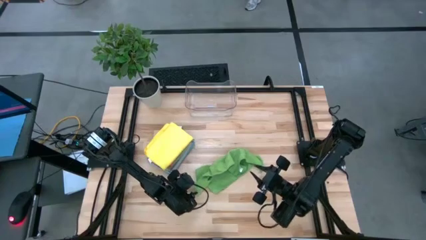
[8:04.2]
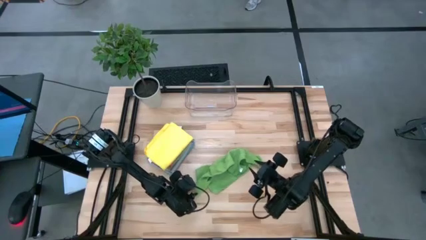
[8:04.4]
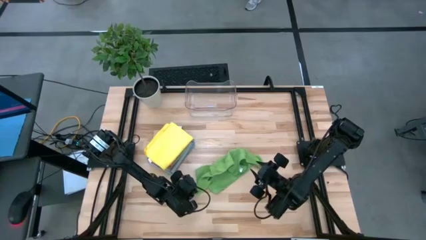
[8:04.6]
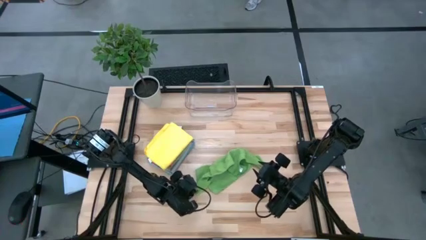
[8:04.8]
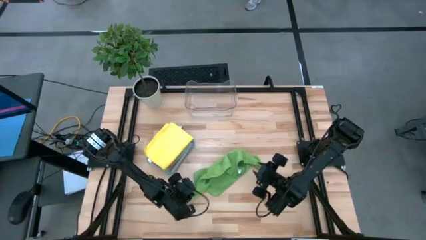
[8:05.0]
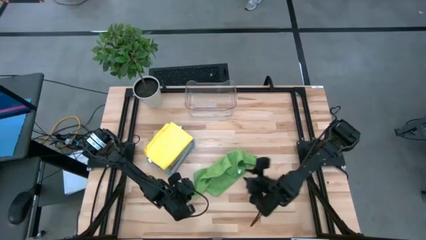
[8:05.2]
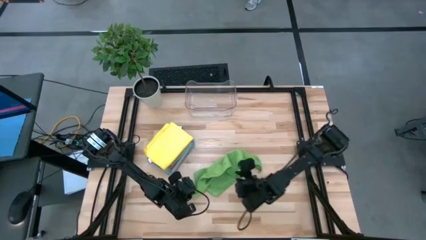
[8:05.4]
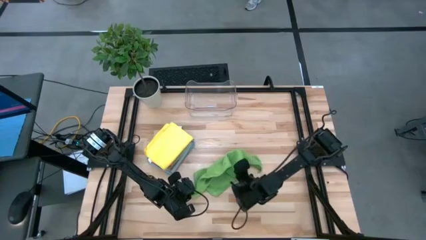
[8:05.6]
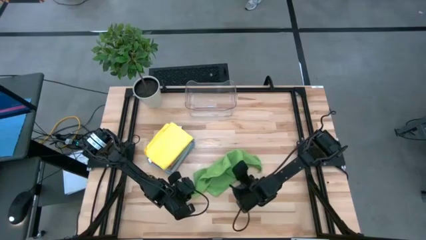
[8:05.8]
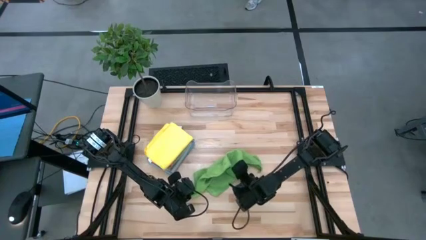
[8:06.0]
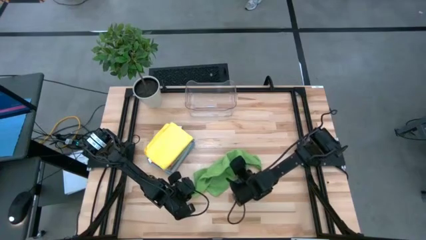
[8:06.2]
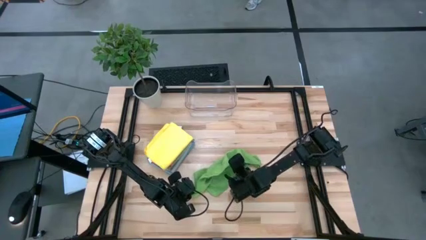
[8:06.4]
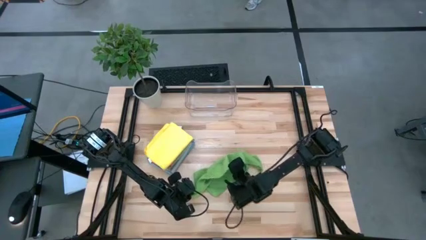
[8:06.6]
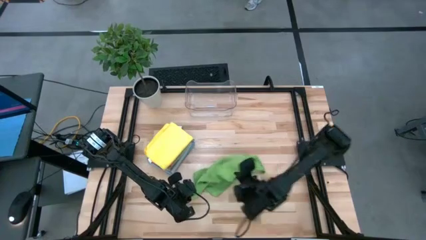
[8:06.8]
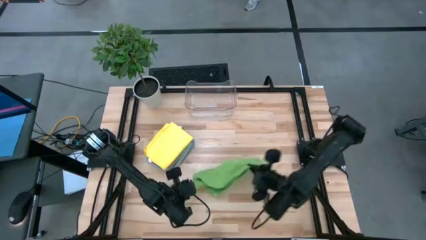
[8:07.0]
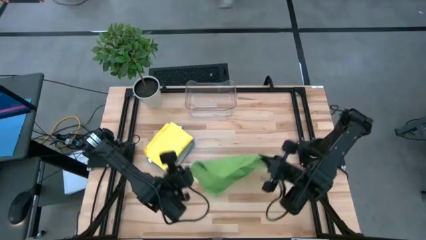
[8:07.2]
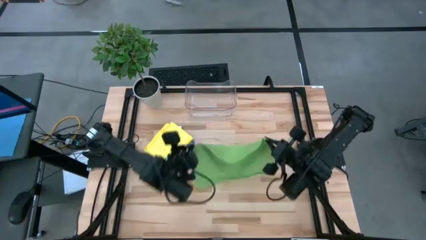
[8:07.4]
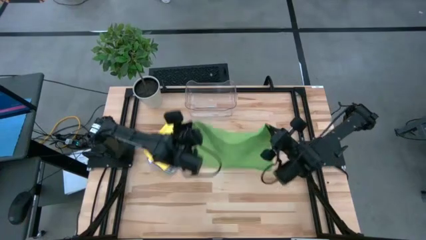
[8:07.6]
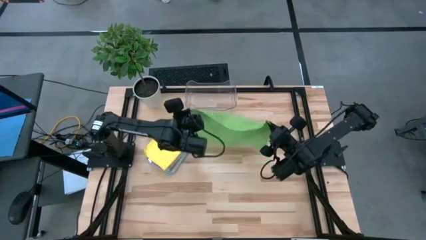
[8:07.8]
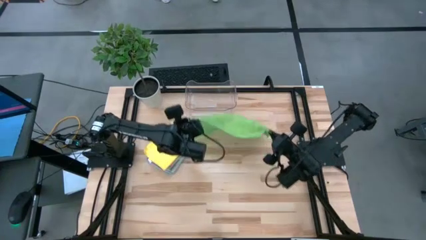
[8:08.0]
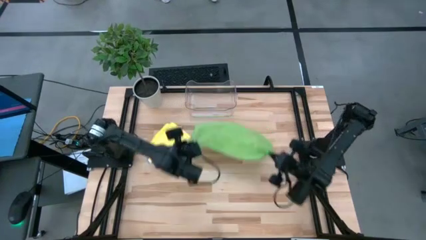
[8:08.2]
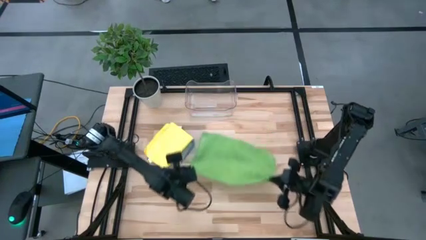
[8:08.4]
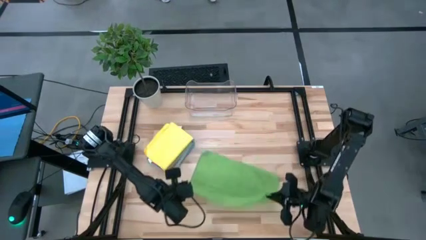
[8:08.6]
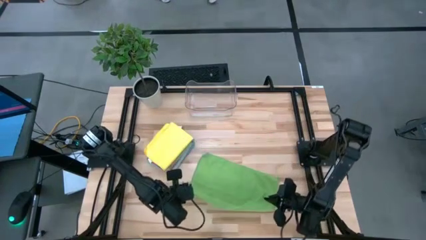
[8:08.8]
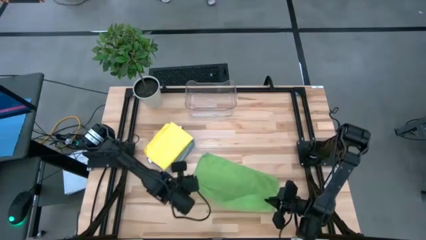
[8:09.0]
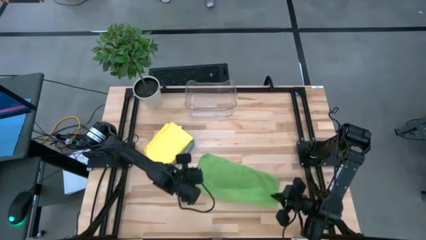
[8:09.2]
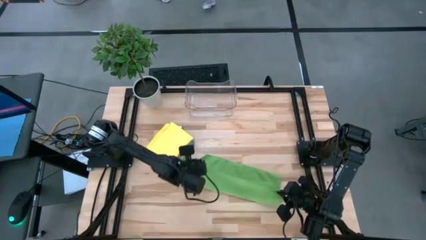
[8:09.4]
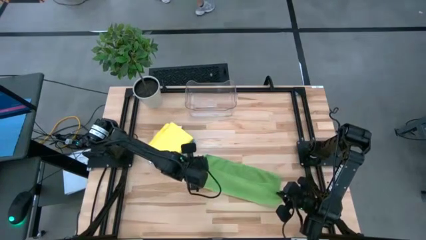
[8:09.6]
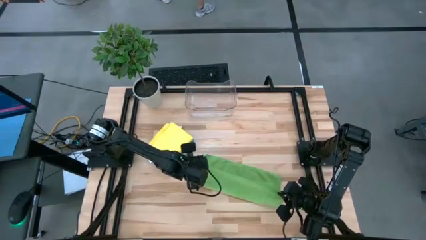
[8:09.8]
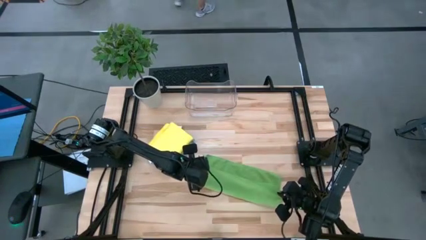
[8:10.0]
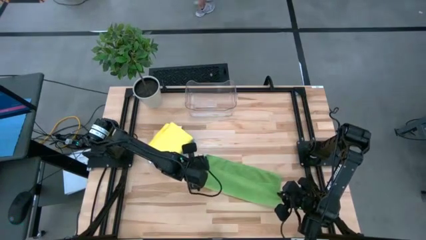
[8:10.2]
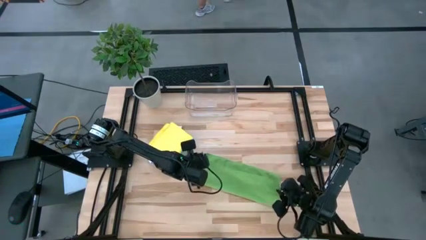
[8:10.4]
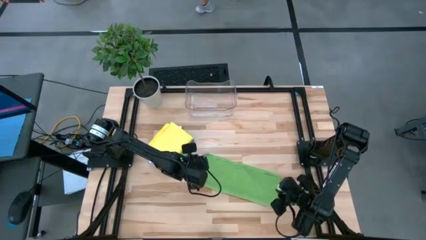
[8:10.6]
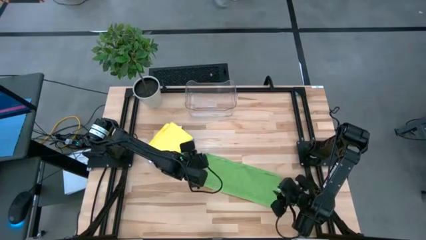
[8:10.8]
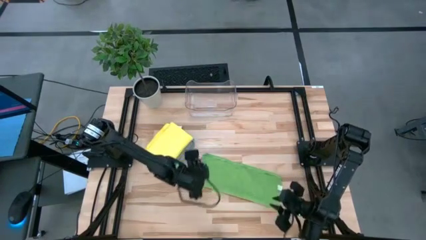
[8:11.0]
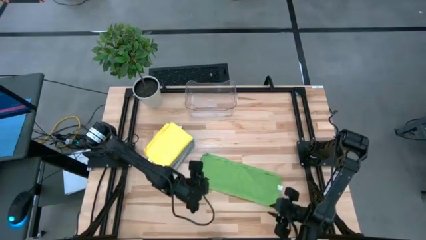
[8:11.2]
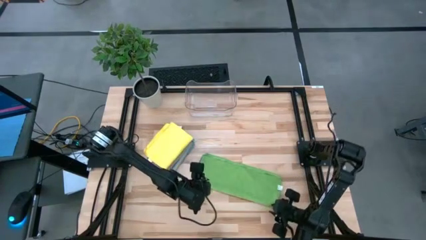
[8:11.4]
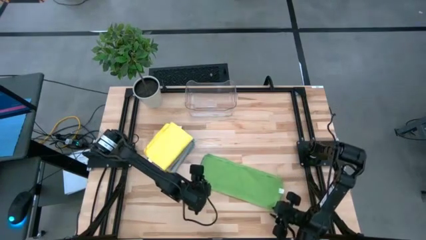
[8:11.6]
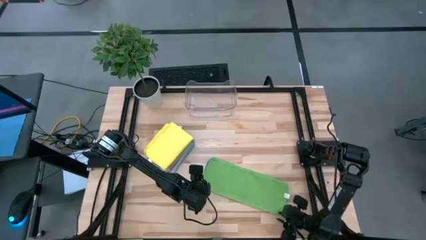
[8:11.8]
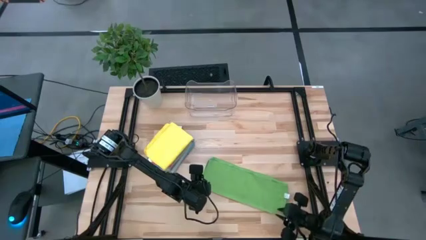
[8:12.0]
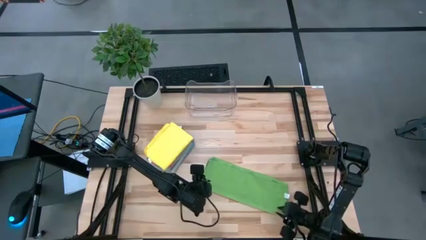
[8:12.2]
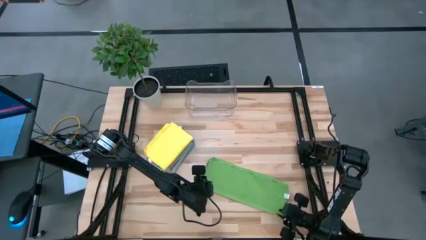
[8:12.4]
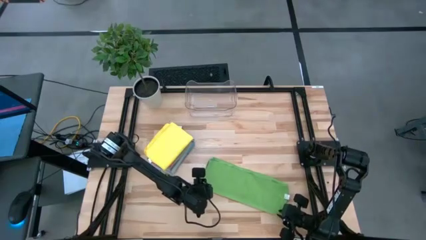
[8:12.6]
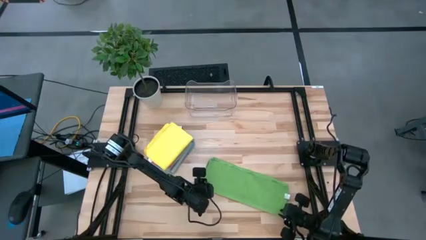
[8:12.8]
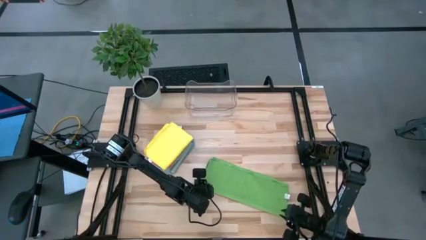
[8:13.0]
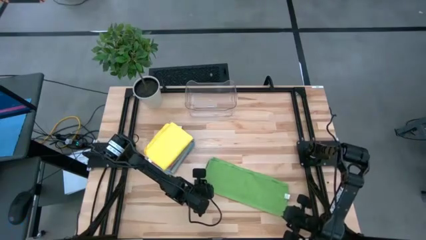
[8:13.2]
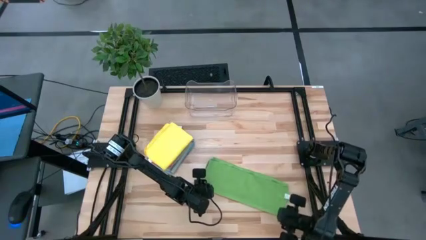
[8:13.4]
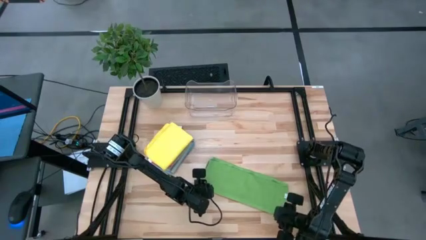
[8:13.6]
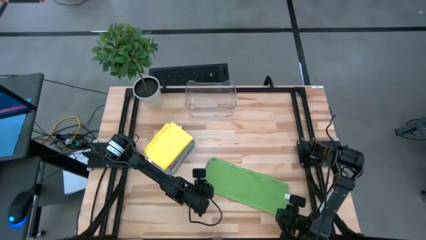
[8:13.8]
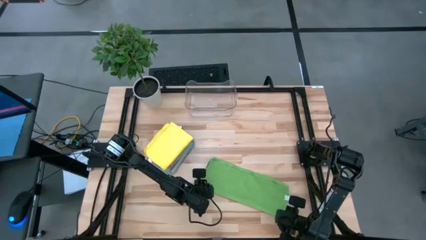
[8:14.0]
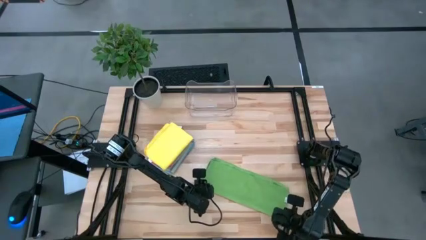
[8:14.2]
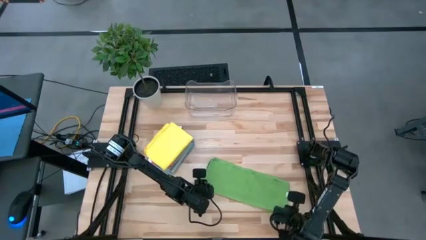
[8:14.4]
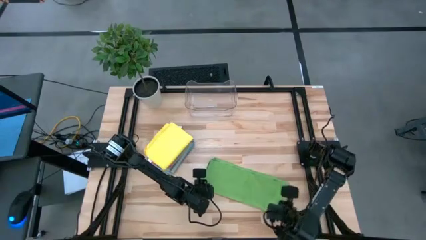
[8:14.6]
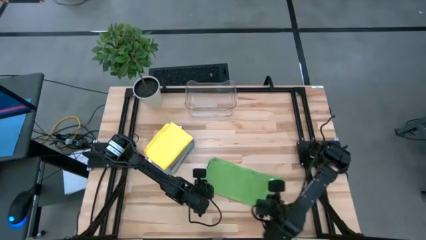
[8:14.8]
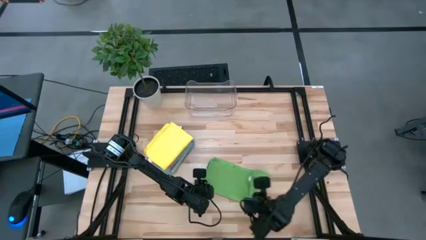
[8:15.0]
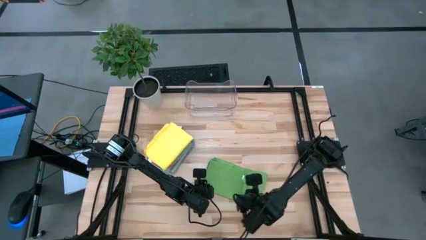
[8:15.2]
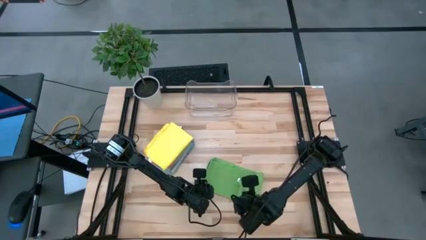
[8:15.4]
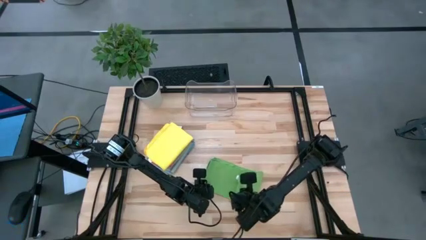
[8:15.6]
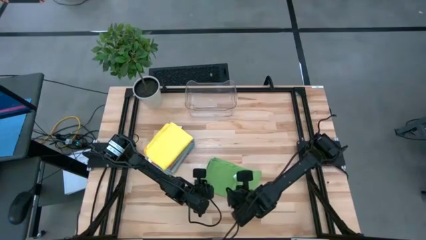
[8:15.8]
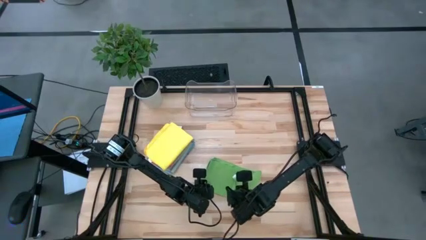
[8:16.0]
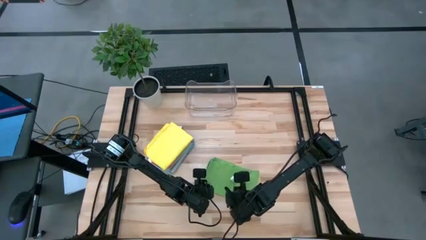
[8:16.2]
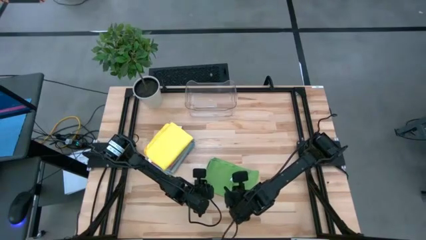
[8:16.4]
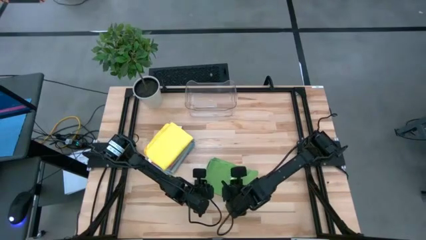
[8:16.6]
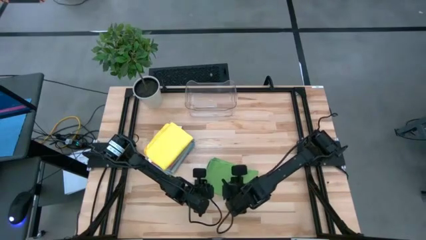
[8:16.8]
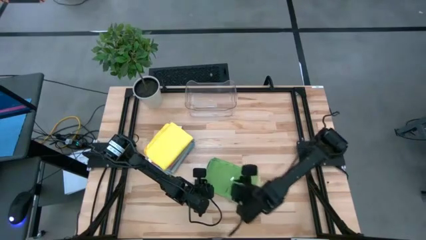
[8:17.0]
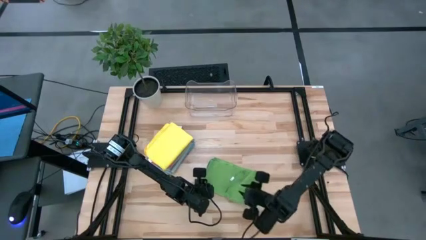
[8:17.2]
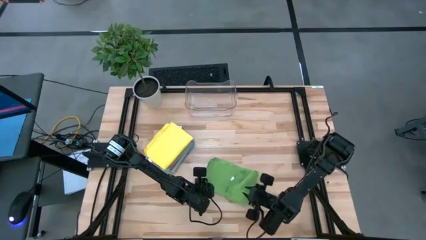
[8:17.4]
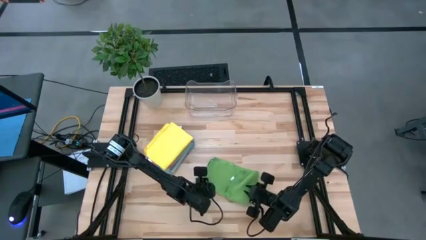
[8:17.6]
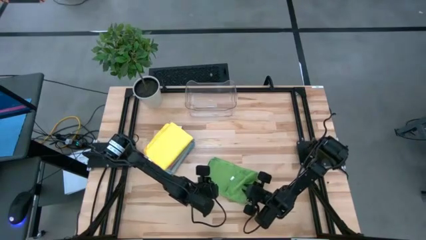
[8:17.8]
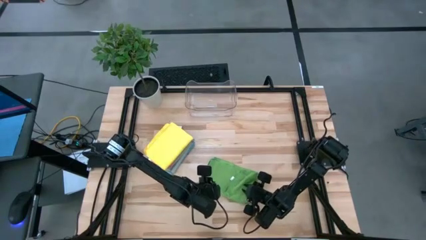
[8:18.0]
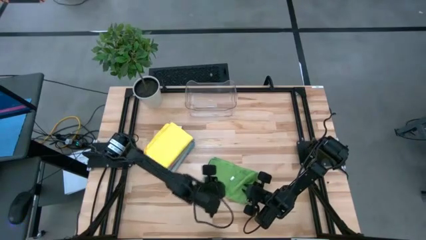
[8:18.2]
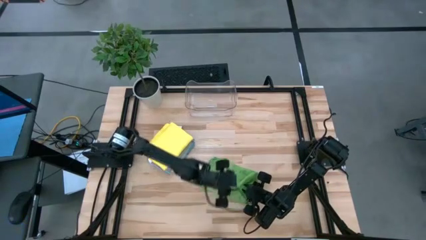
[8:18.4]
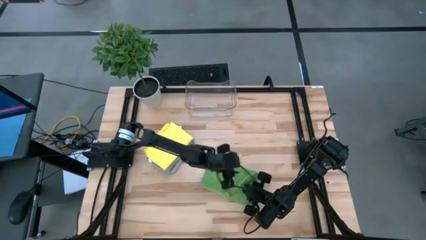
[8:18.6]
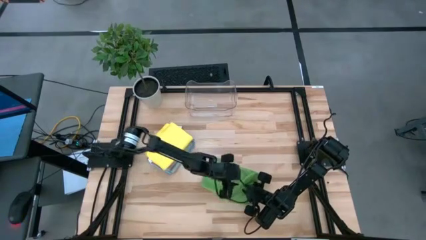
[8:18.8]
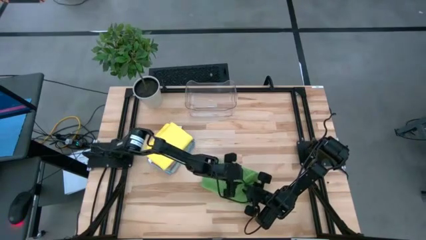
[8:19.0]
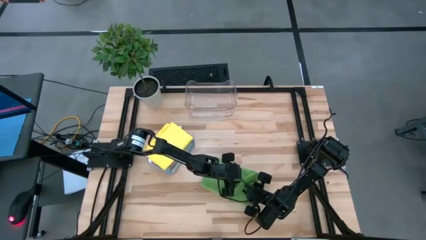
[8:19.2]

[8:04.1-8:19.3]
Task: Fold microfiber towels
Fold the green microfiber cloth
